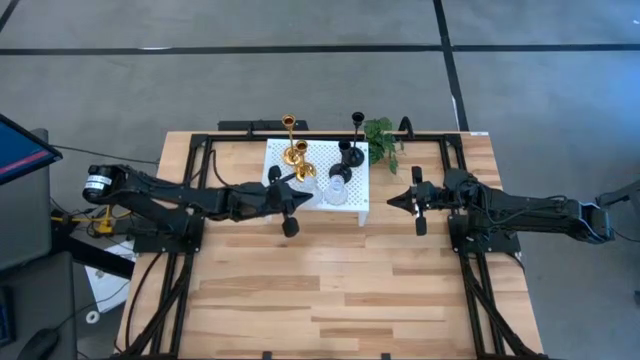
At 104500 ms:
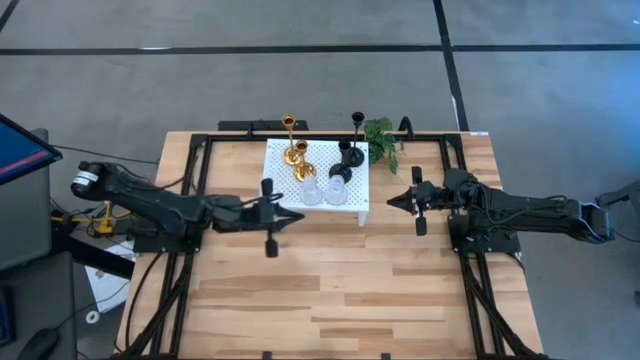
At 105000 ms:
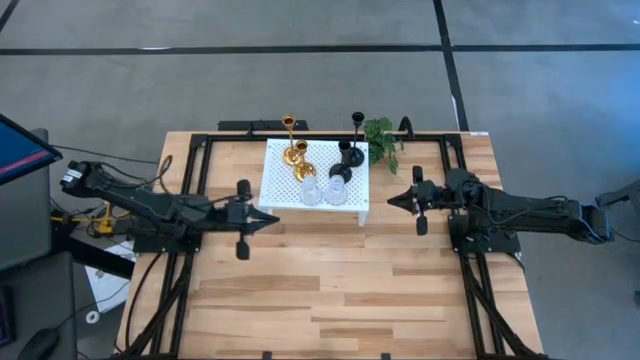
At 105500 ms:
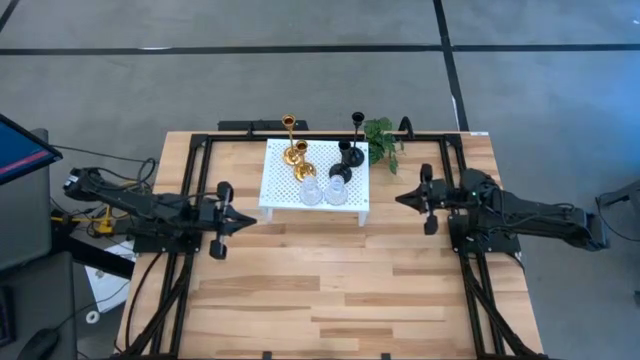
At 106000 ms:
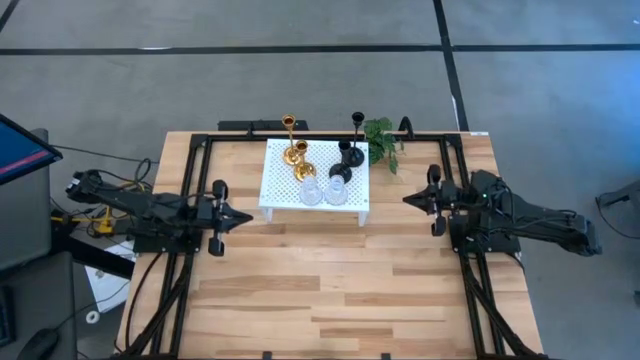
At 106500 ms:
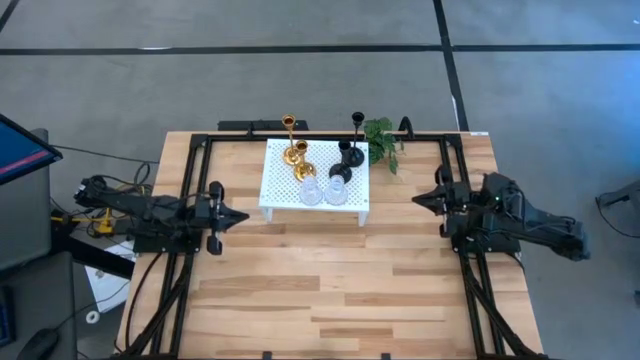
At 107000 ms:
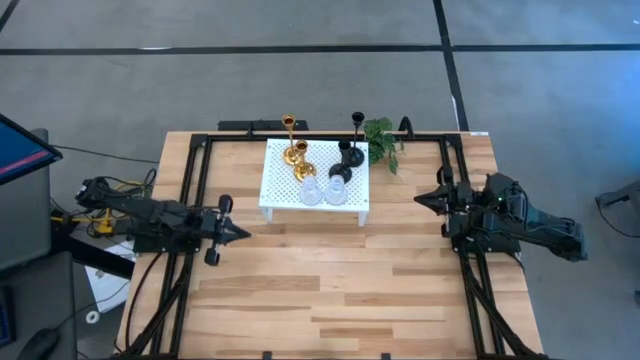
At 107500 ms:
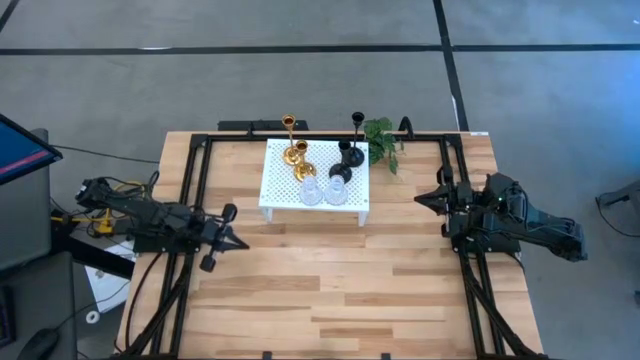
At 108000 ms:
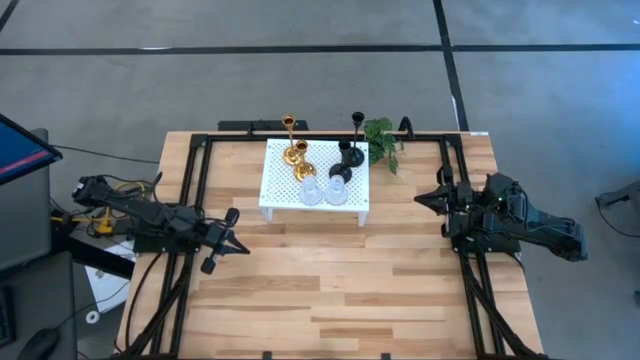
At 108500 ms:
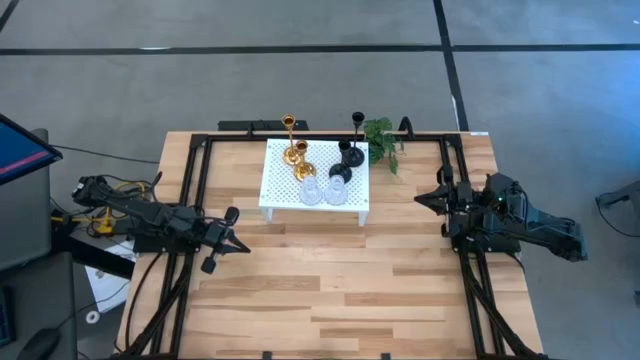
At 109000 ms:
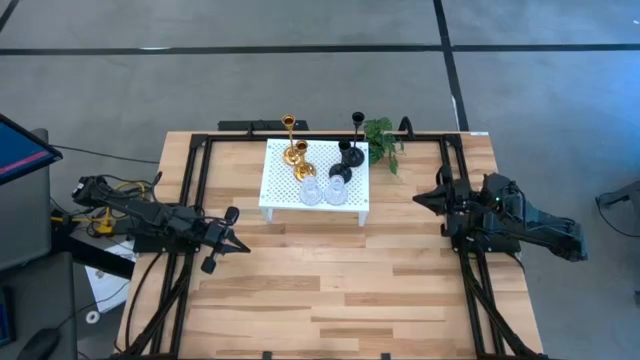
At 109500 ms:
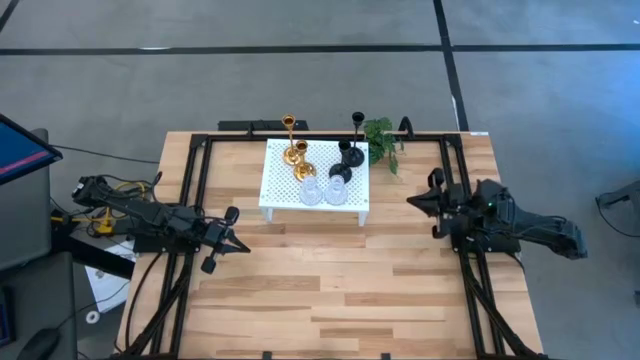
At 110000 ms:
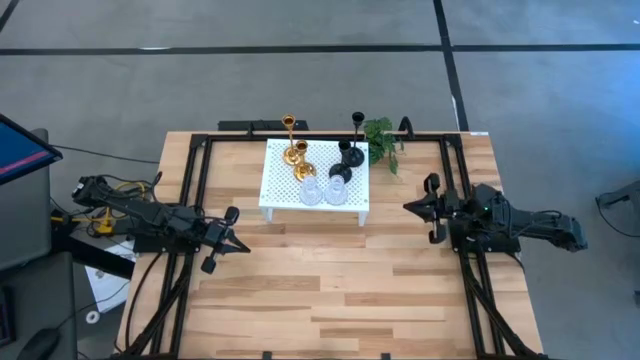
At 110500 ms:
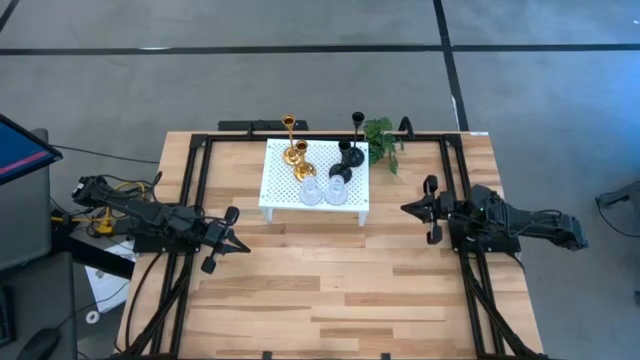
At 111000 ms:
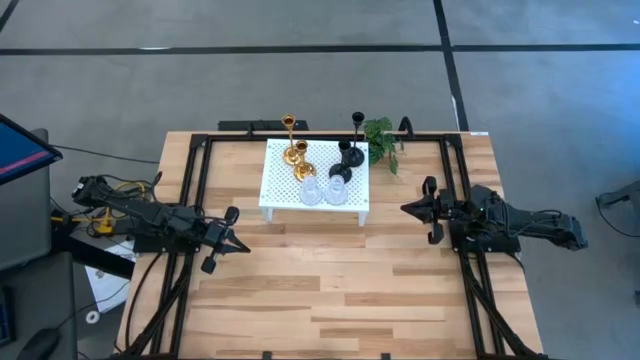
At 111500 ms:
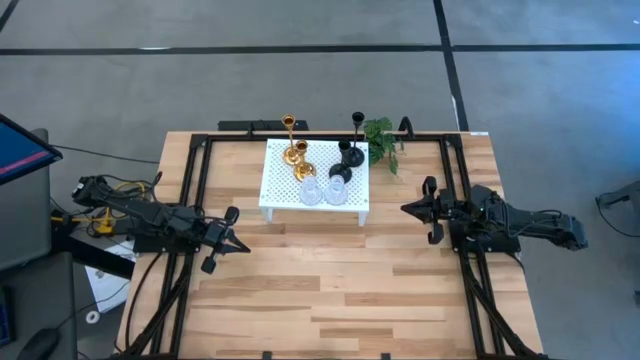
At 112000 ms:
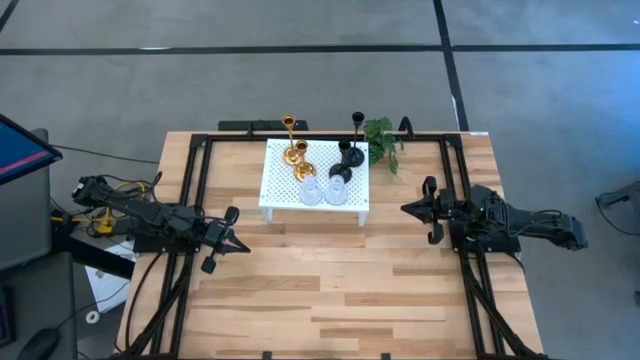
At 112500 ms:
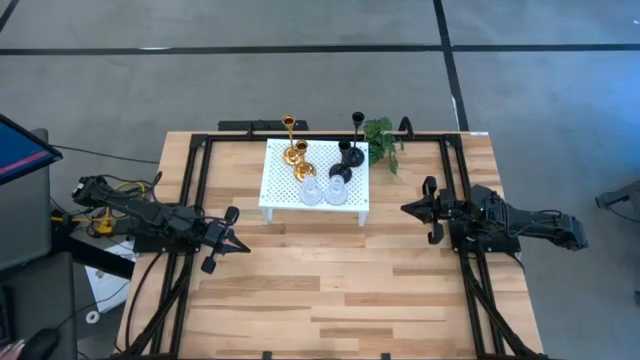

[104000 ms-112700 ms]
Task: Pick & Place candle stick holders
Return to Home Position

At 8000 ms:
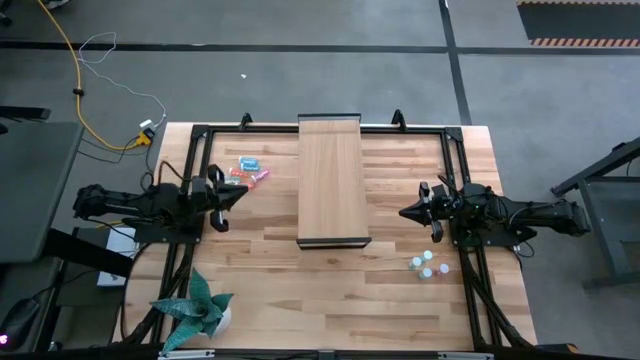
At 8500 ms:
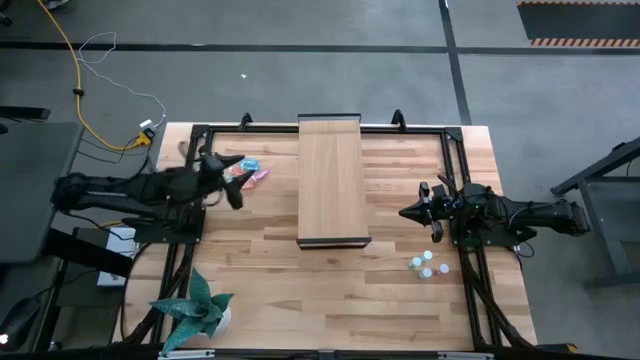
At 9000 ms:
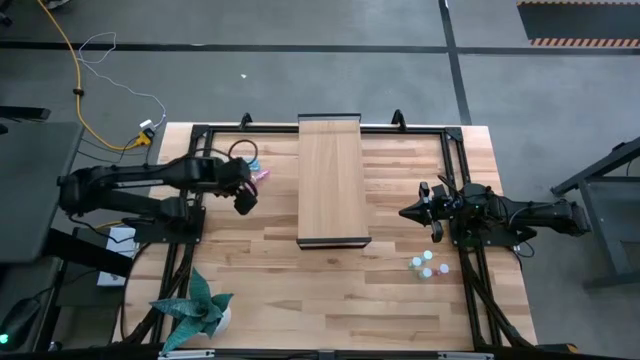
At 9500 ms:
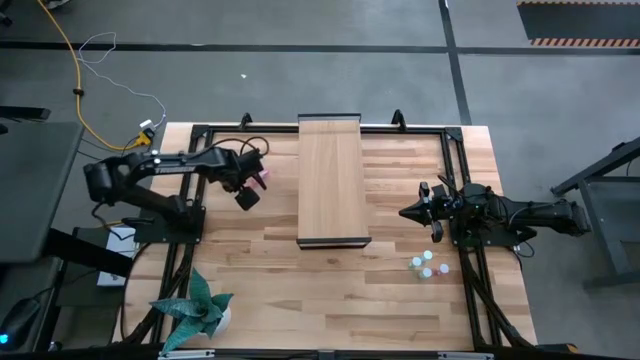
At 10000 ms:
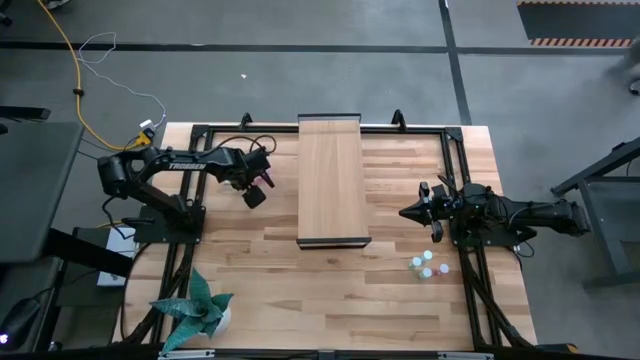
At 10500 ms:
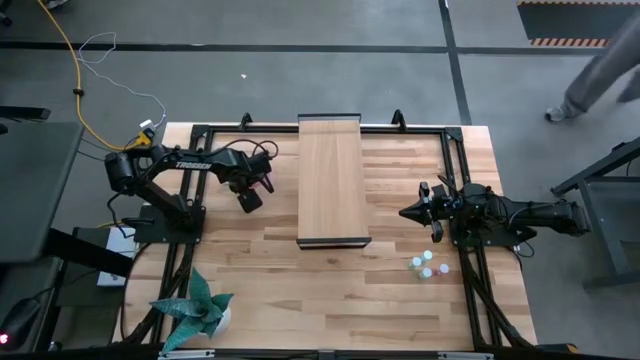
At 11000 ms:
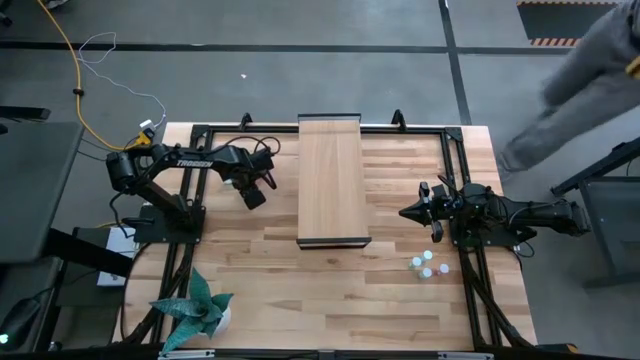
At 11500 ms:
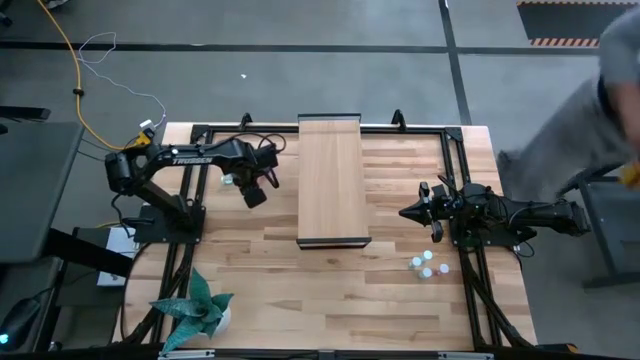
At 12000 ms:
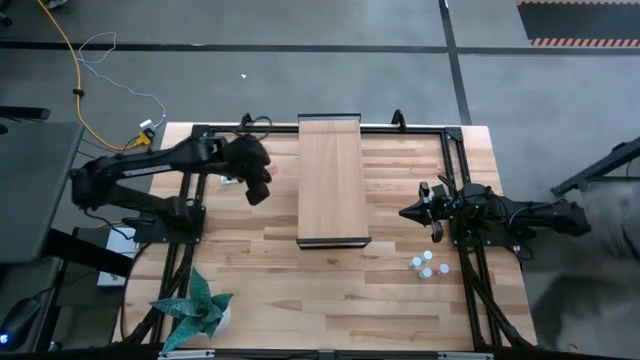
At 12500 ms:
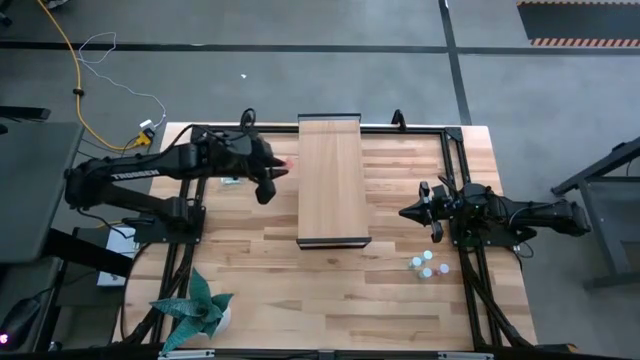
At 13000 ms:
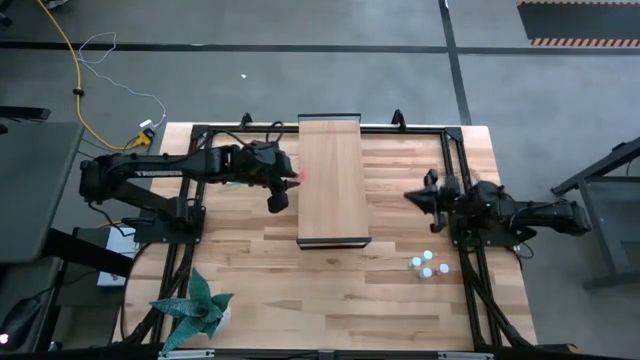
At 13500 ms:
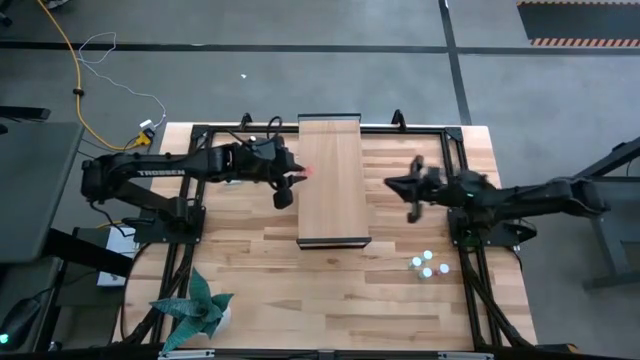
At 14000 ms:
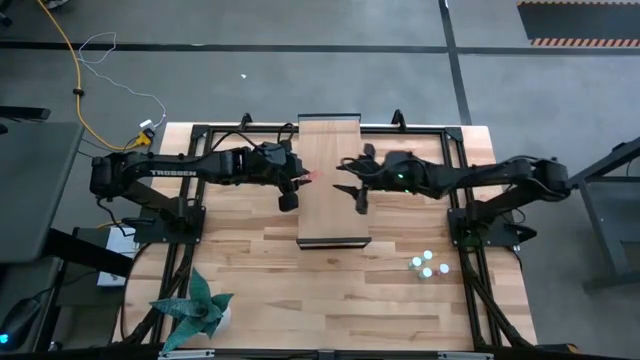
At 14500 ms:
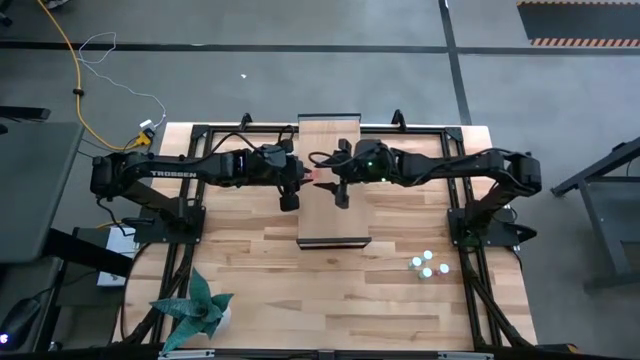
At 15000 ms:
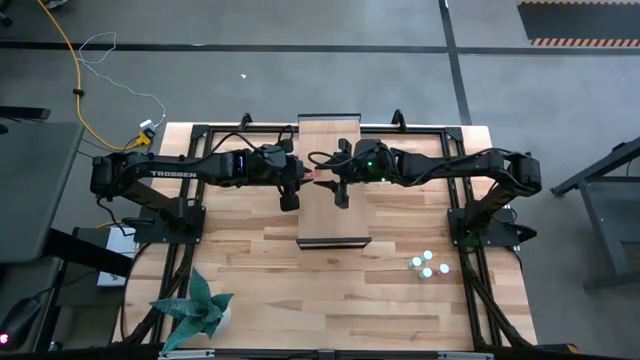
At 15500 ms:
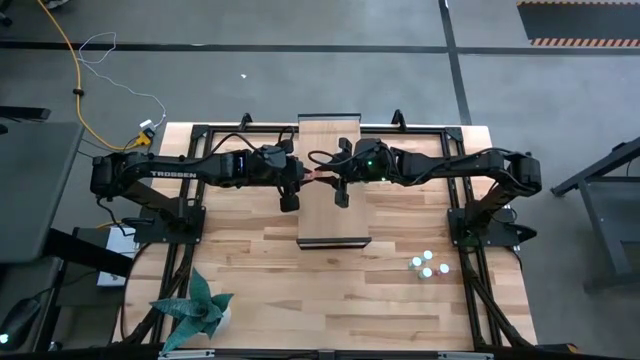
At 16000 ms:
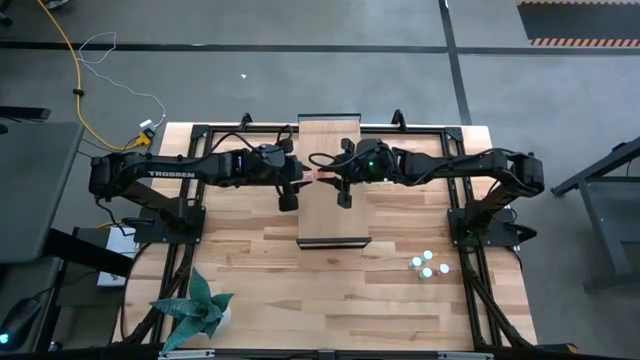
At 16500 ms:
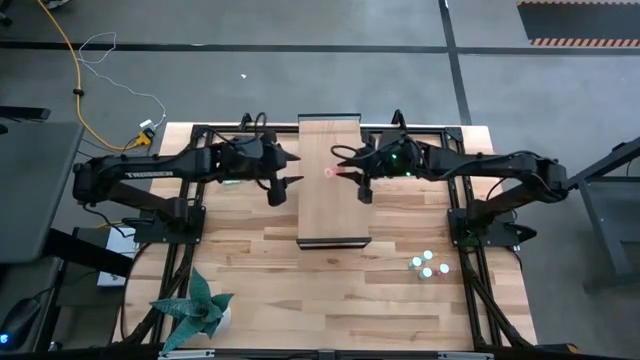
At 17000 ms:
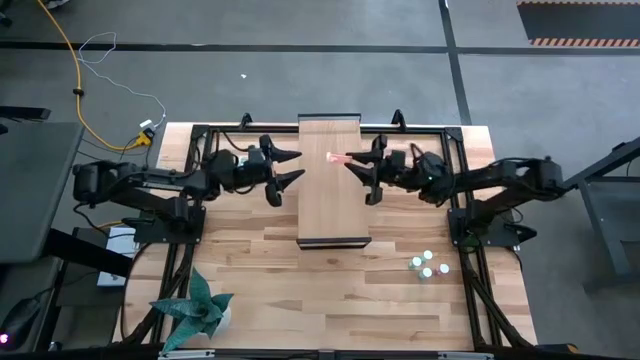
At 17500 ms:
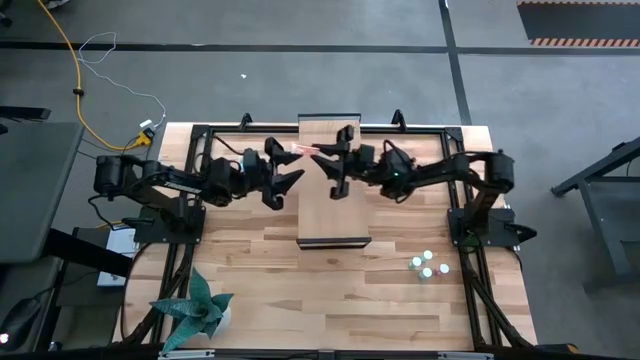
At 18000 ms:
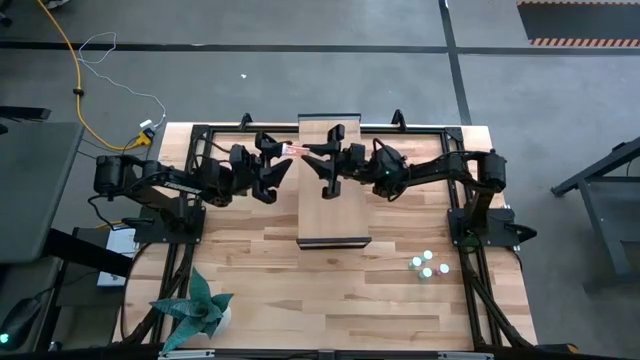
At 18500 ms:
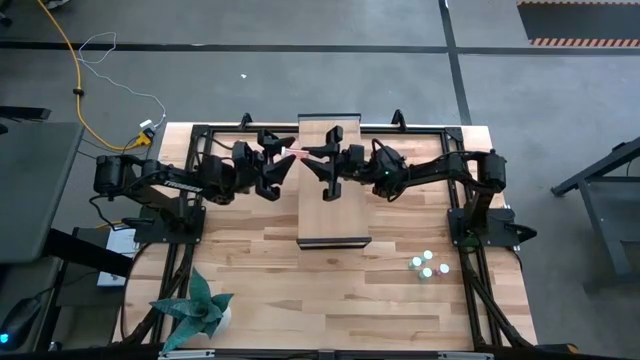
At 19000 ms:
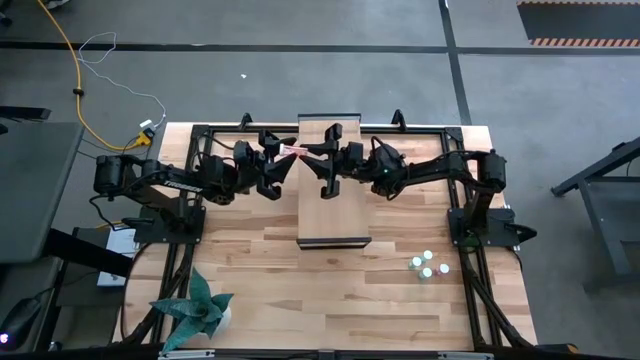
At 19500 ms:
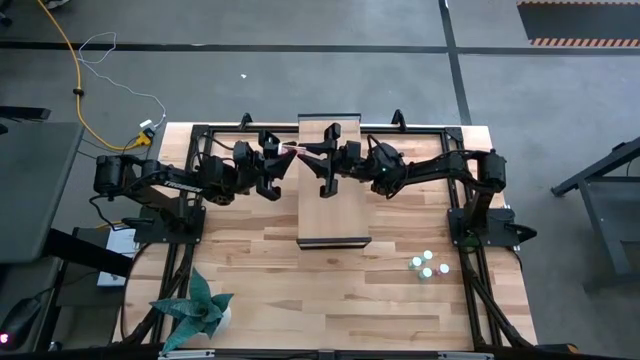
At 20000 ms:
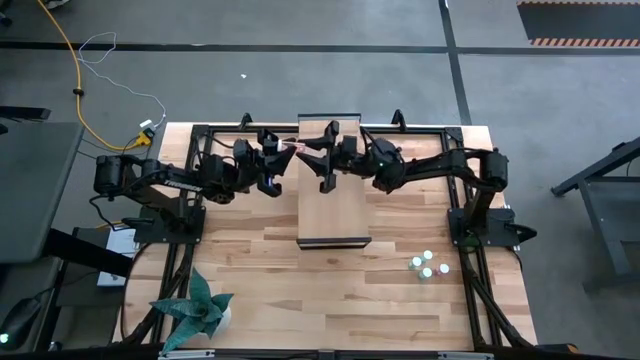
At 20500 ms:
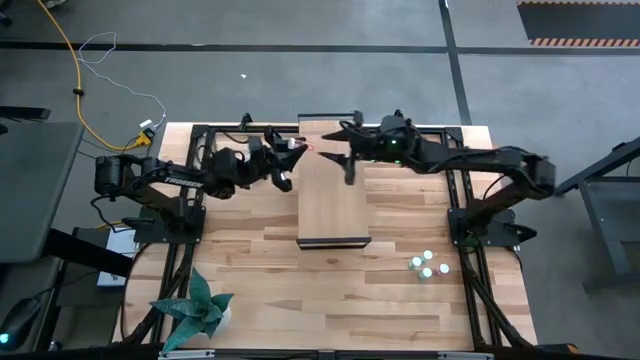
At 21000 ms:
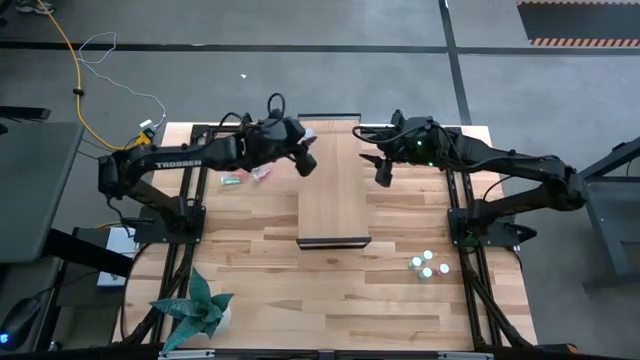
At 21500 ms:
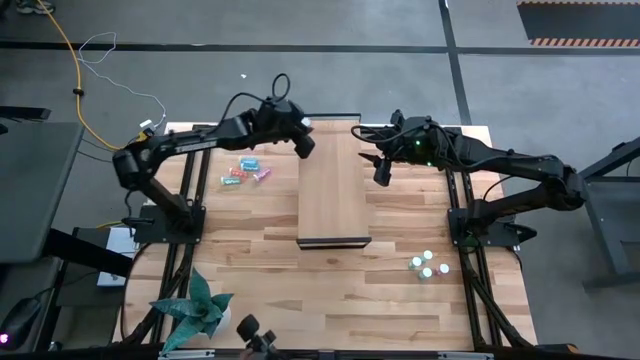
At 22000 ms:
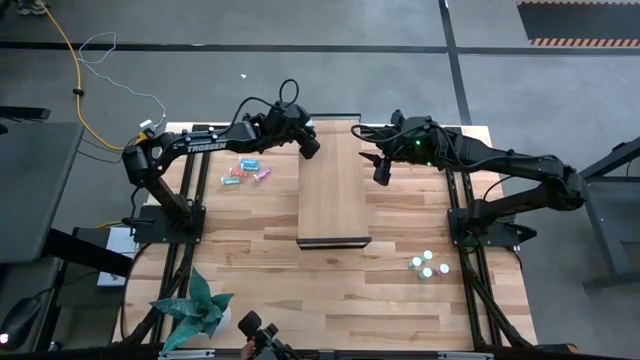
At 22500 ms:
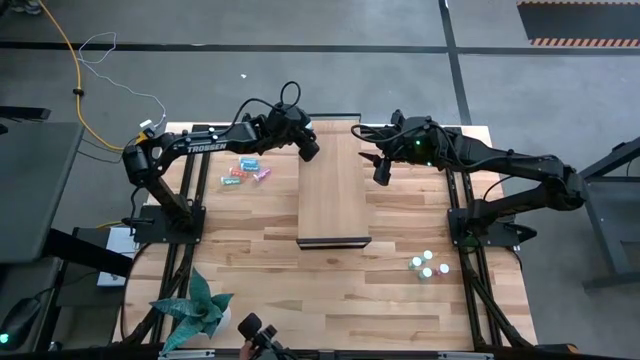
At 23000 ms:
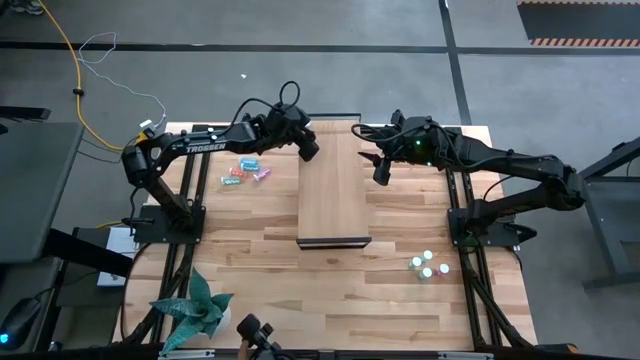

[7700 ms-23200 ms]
Task: Pick and place medicine bottles onto shelf by color
Put the transparent orange pill bottle on the shelf
